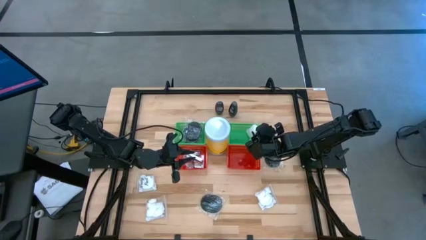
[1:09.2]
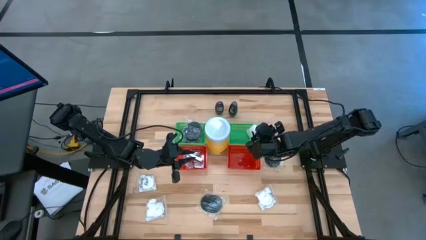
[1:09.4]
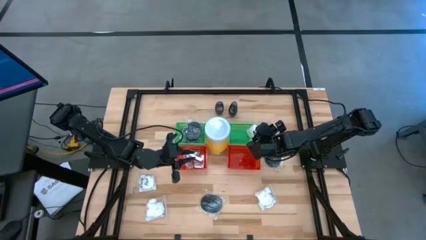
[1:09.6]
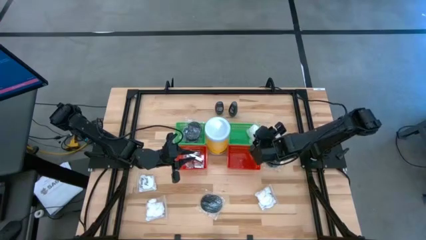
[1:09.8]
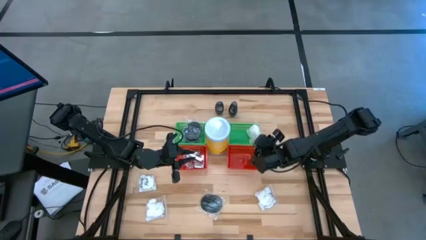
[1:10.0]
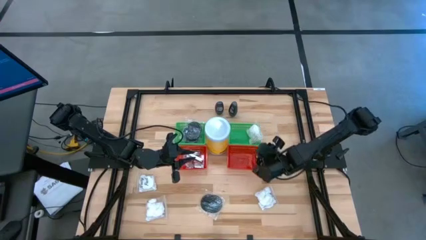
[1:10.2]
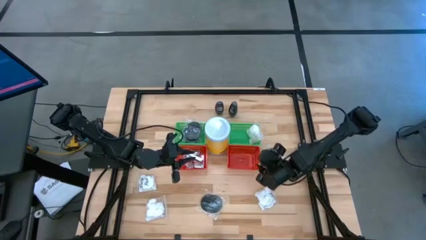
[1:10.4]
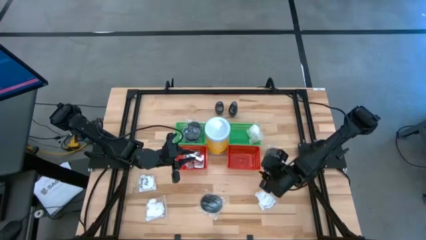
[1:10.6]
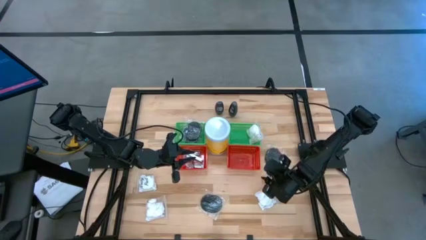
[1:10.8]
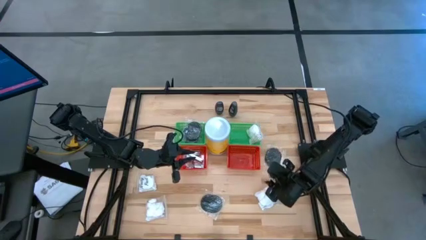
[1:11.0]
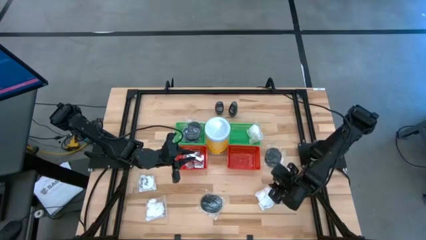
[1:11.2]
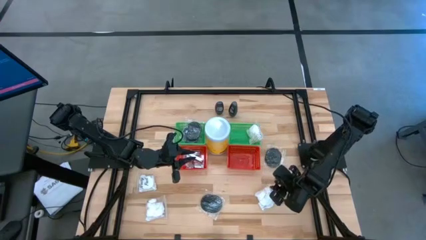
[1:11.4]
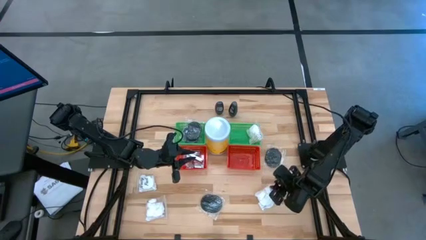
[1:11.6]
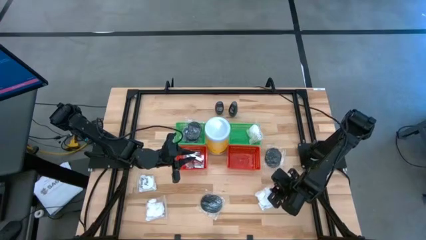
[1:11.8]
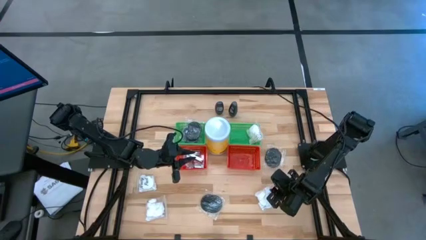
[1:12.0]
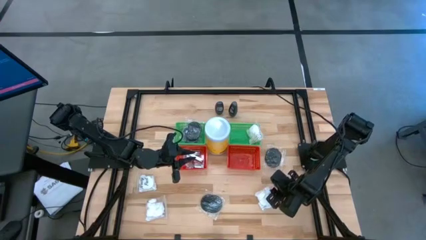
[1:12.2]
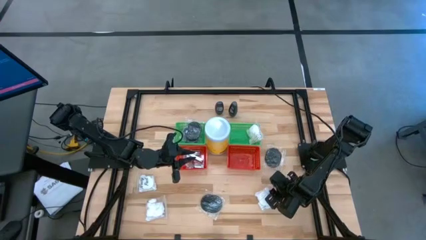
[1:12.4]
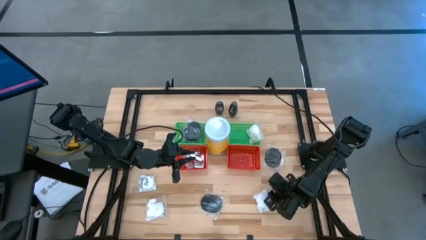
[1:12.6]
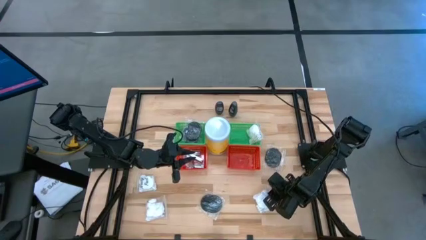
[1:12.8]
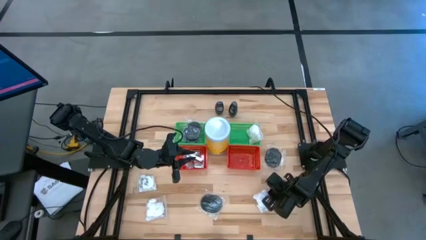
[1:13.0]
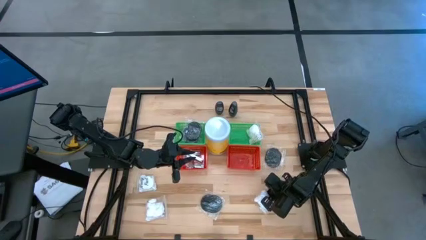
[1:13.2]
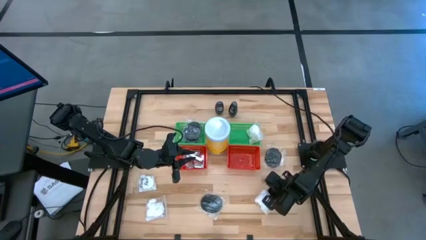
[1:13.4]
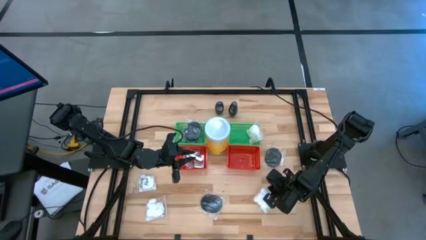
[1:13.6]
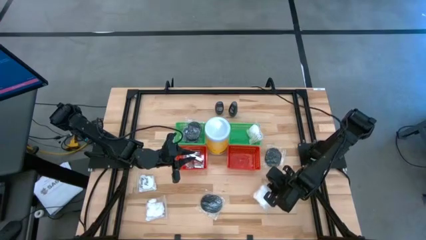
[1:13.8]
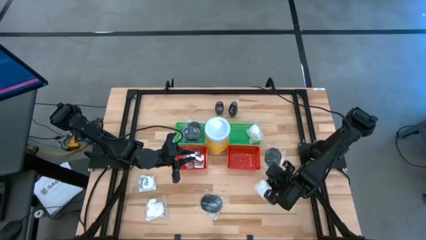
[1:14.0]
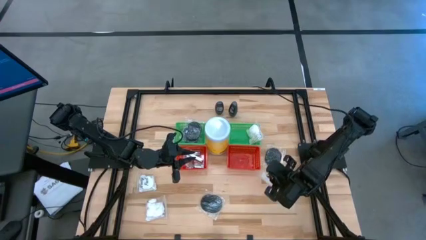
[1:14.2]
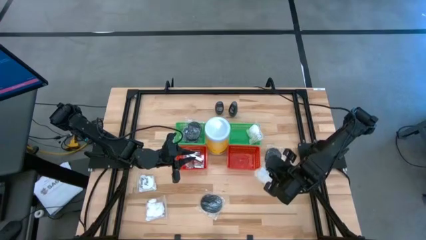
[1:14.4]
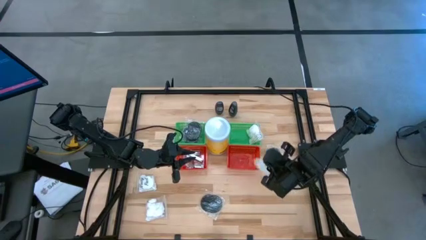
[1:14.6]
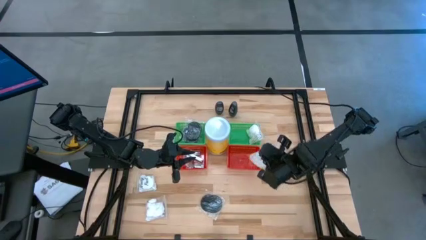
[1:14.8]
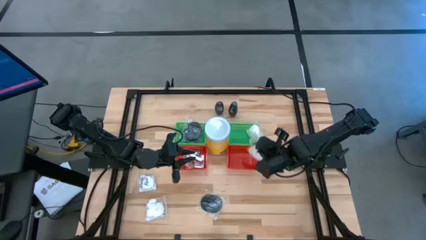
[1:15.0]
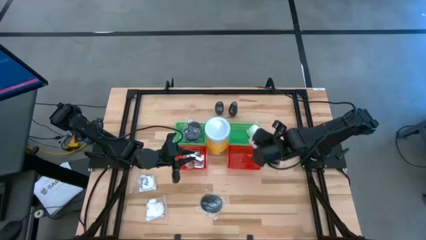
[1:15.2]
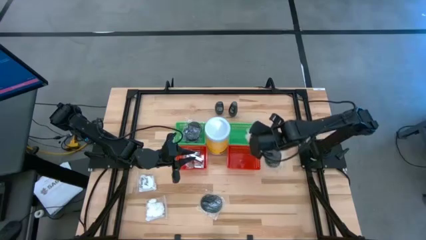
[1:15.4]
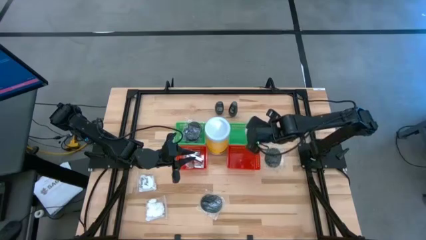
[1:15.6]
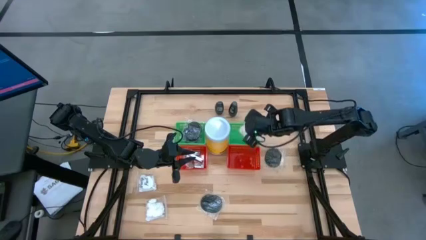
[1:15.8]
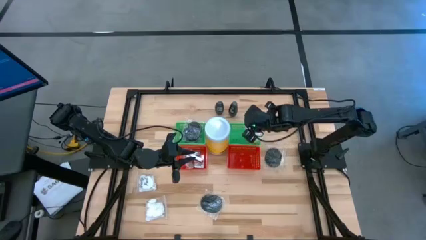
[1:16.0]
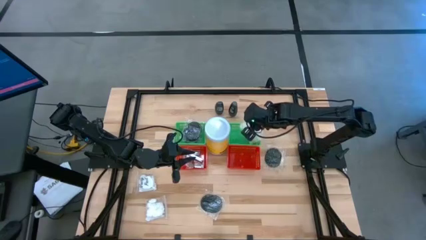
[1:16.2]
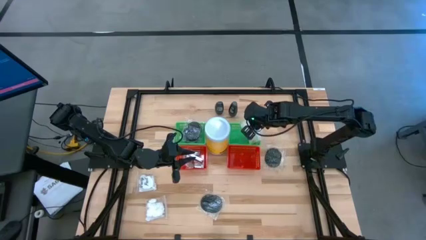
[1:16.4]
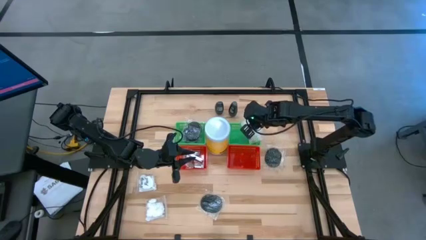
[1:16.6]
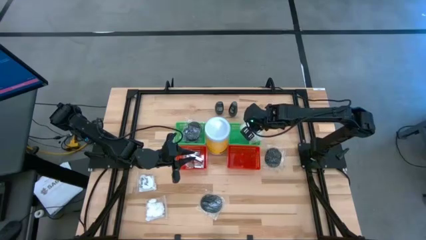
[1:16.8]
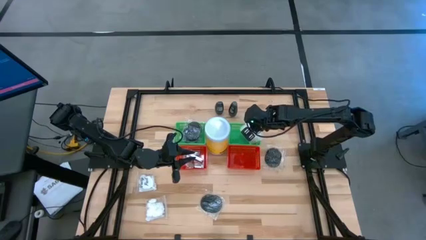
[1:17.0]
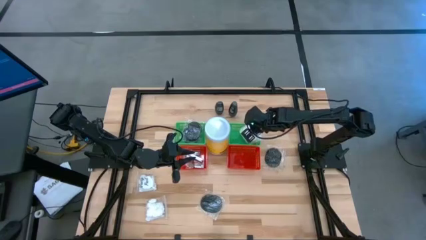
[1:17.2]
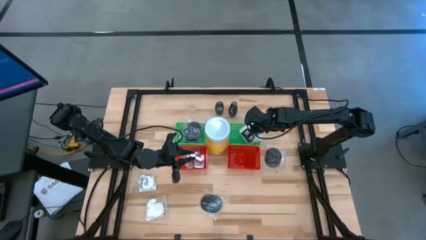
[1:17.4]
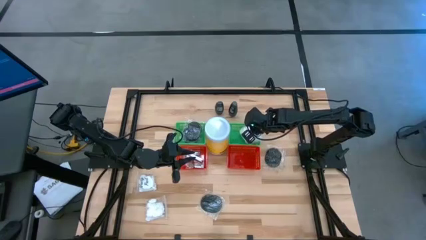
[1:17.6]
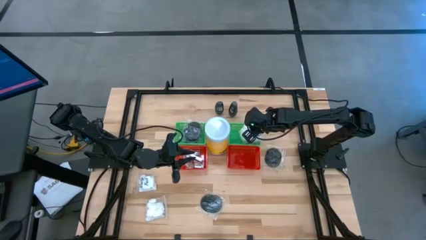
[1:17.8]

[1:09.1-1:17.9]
Task: Pick & Place Travel size toiletries
Put the right vanity pack into the right green basket

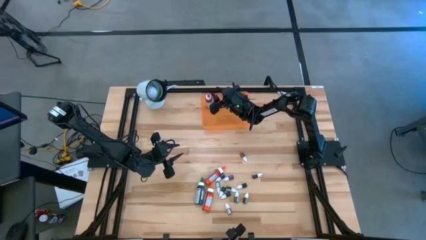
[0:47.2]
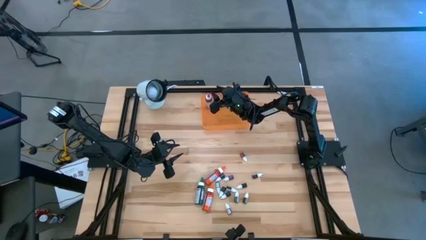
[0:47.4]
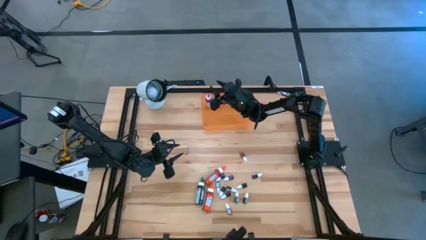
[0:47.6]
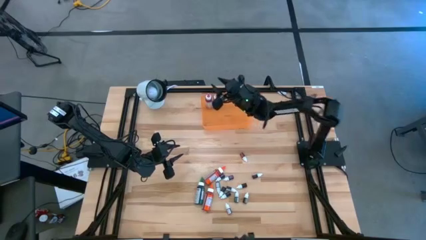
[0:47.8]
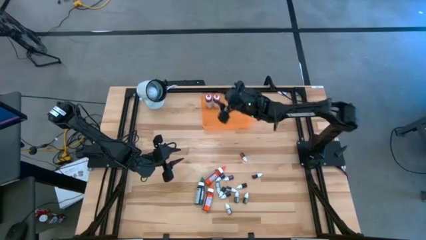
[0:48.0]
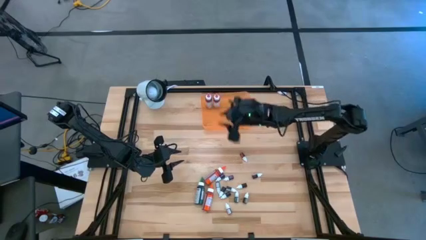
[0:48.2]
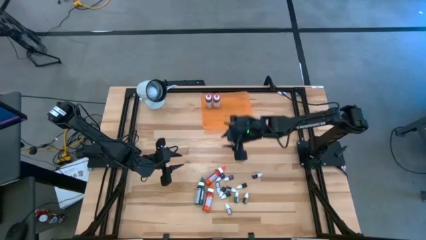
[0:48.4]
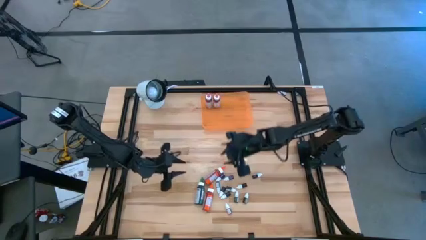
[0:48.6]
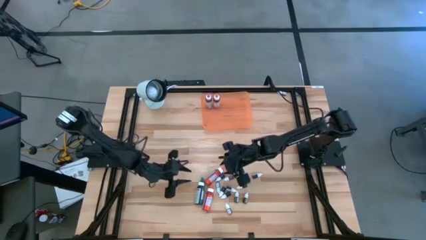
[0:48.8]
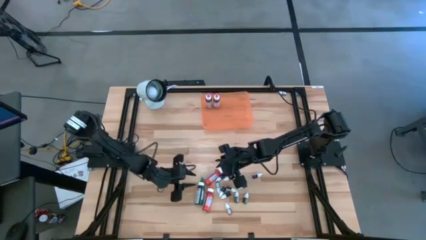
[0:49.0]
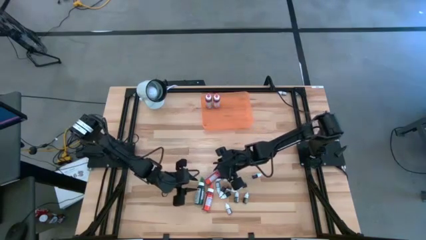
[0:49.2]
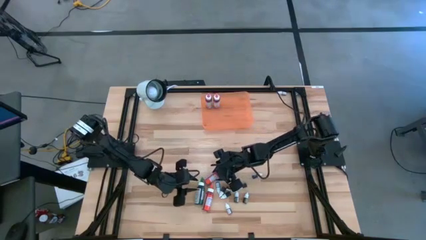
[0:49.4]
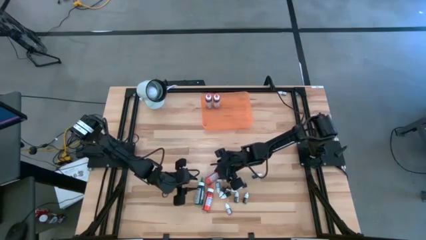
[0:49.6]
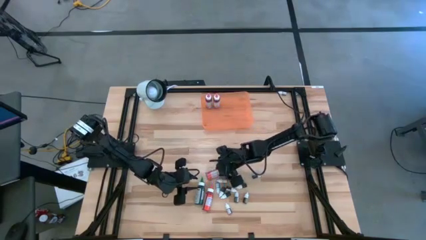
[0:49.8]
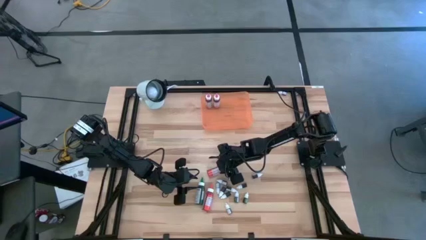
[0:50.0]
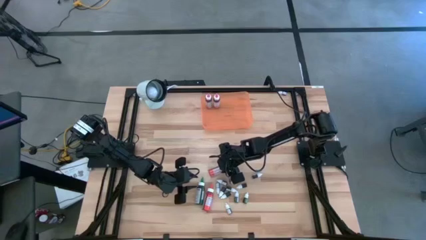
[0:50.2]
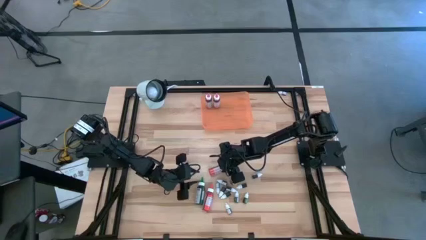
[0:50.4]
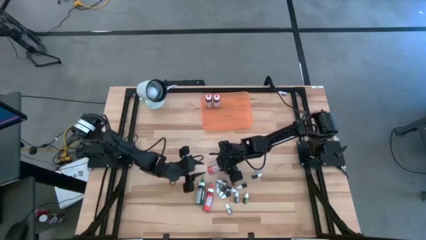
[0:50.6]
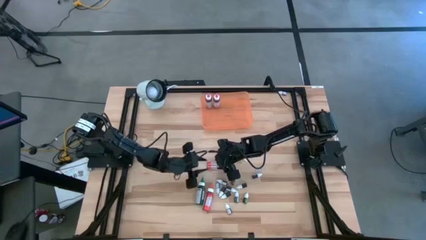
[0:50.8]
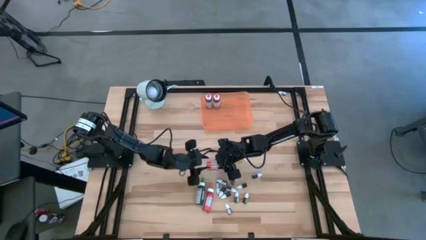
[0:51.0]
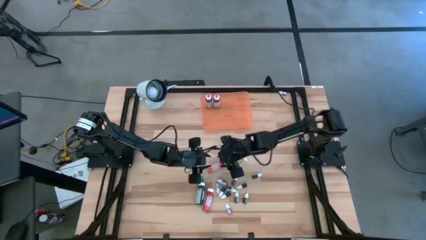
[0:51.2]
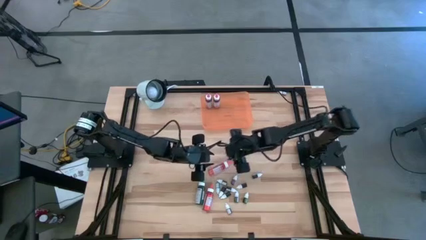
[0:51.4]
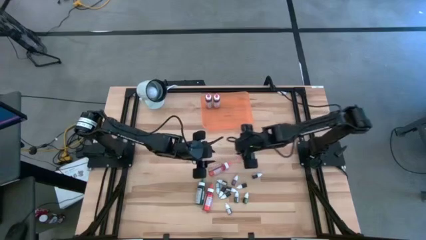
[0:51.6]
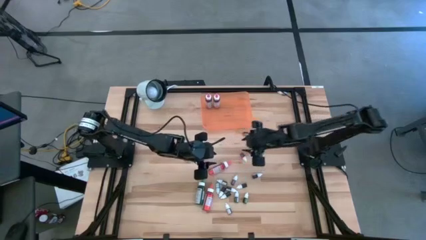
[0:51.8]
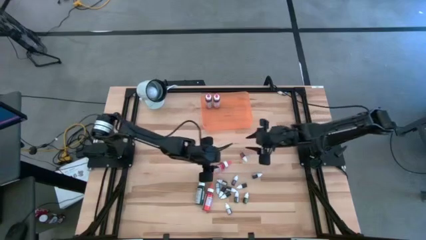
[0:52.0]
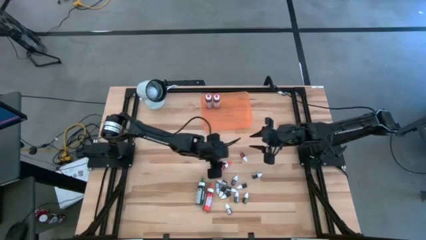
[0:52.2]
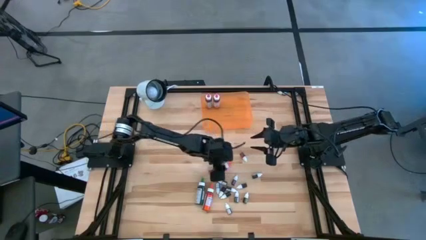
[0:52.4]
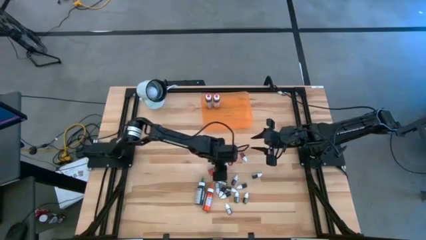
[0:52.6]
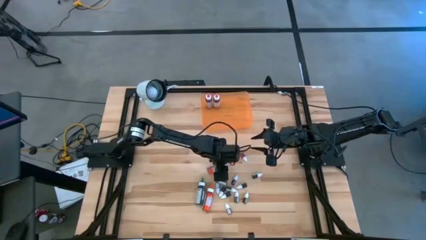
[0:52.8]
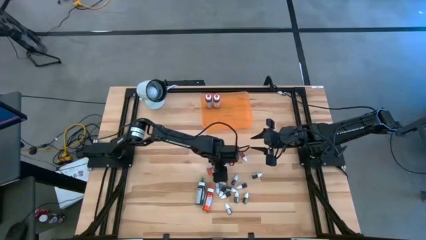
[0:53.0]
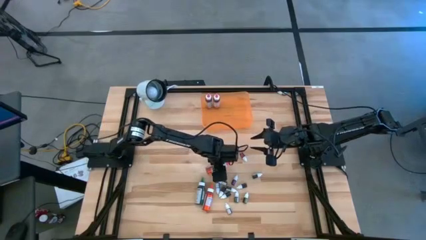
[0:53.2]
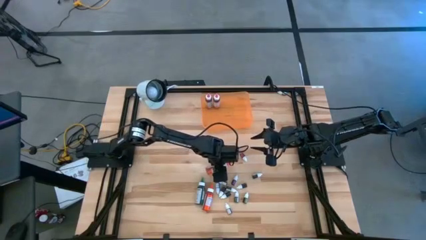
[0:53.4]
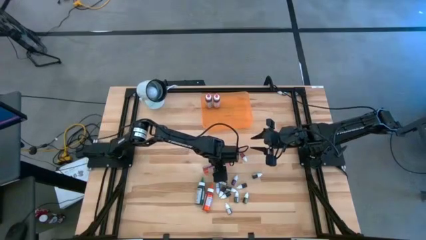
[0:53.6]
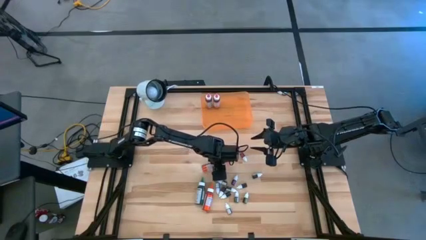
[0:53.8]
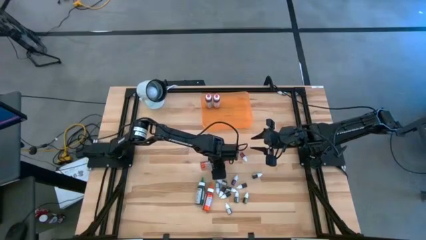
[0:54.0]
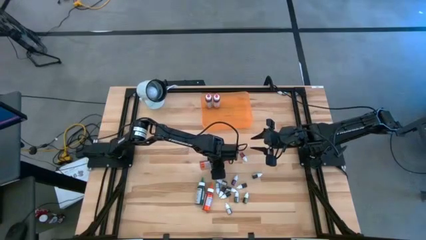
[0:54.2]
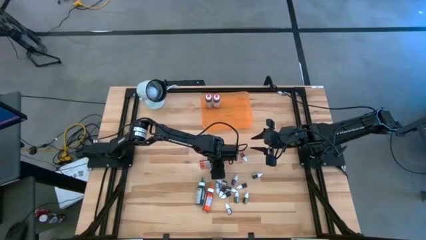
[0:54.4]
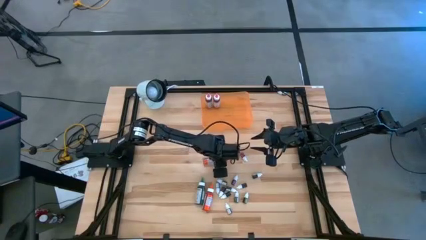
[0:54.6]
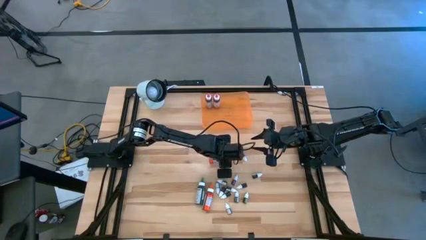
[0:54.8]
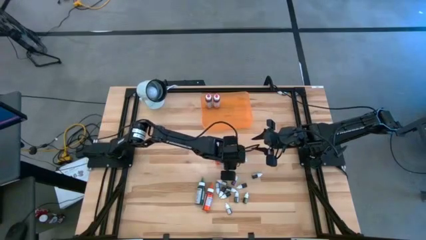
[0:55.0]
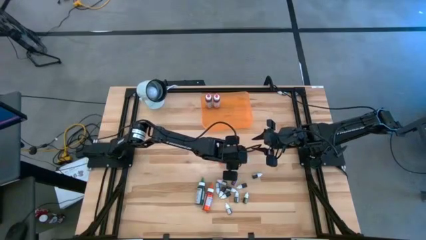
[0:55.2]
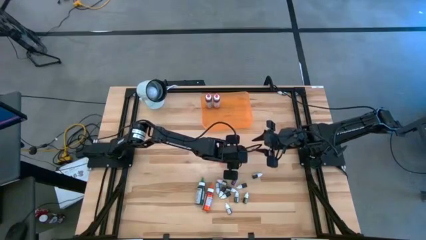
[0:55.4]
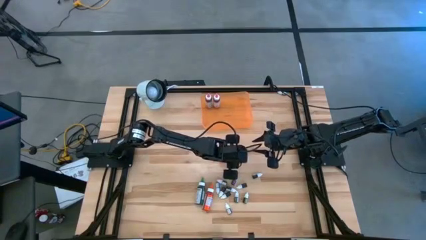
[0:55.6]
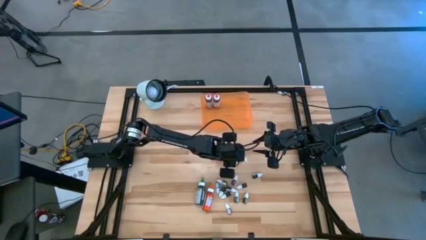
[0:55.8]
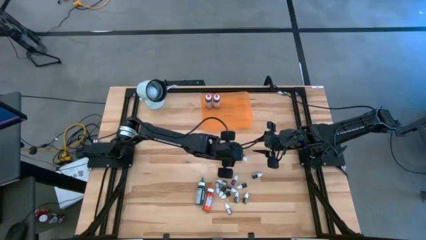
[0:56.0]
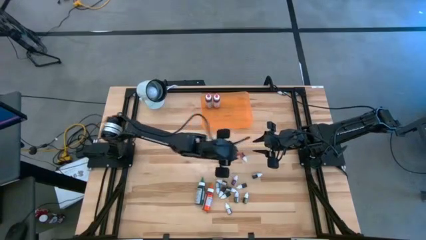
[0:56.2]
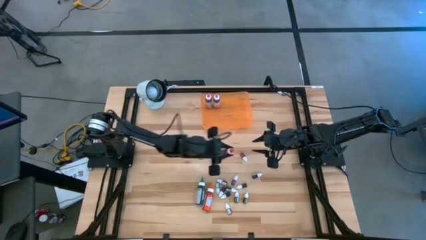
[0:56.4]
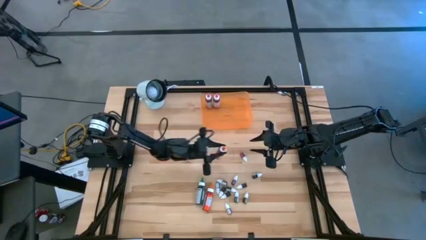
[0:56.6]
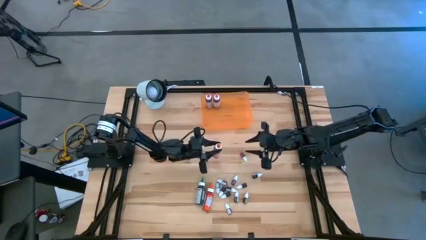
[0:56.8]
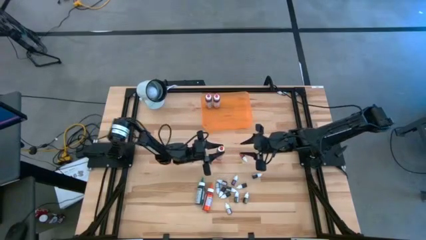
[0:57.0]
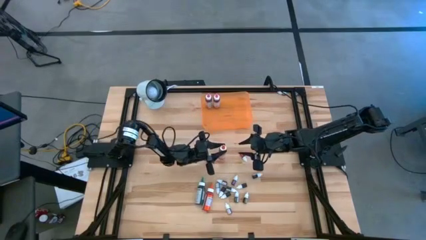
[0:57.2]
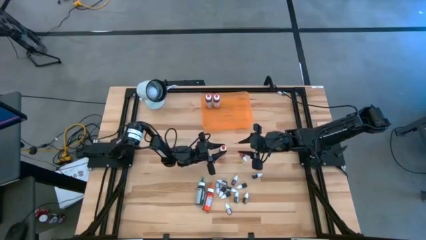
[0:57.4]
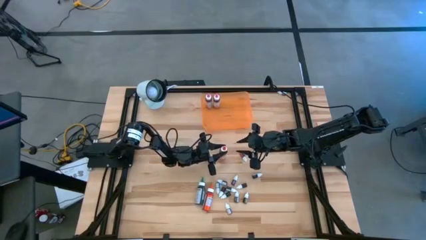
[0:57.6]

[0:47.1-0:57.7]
Task: Pick & Place food coloring
Put the large orange food coloring bottle into the orange bin
